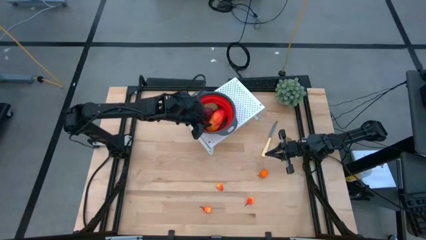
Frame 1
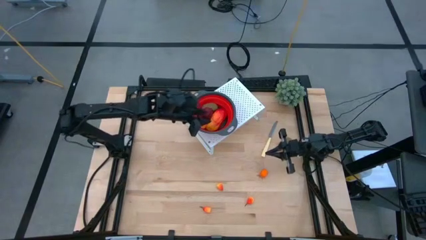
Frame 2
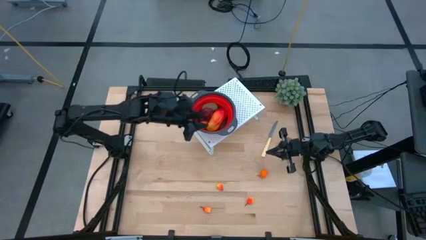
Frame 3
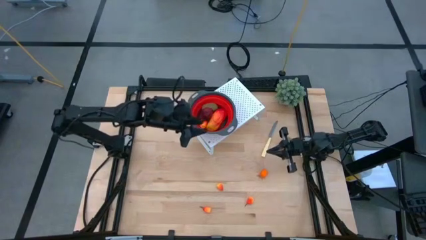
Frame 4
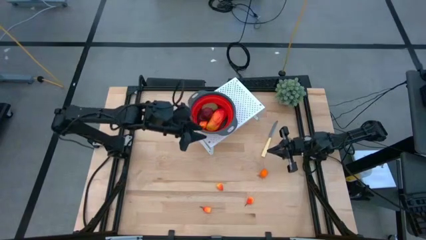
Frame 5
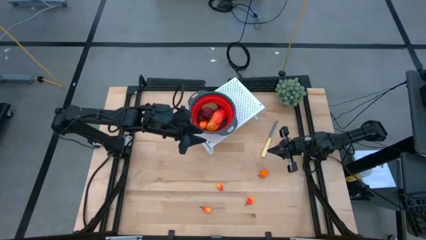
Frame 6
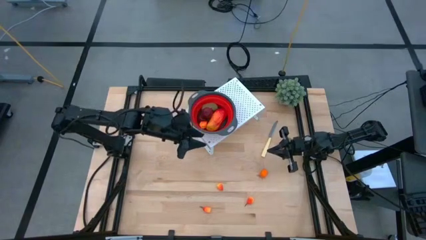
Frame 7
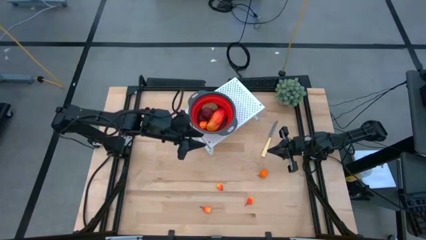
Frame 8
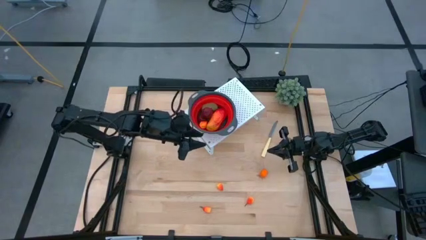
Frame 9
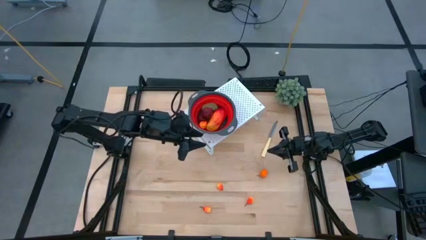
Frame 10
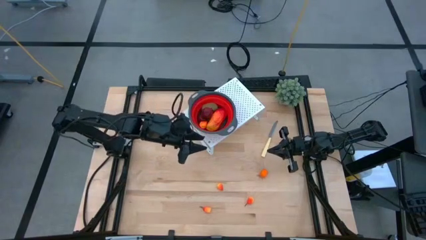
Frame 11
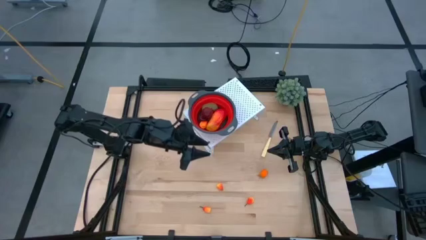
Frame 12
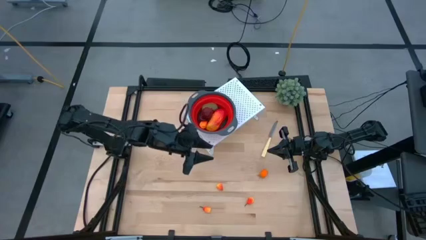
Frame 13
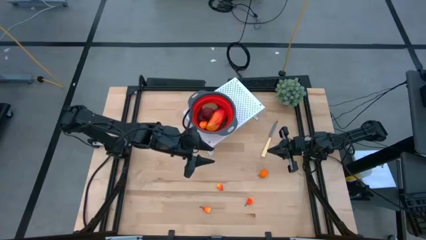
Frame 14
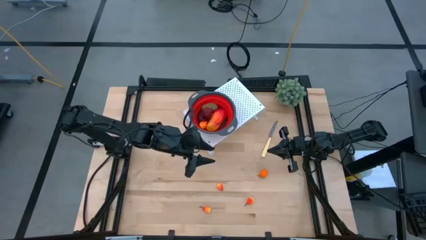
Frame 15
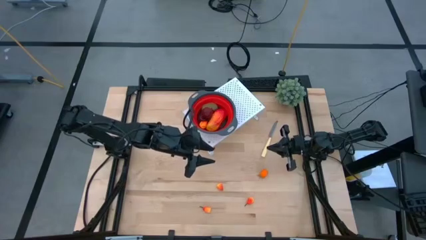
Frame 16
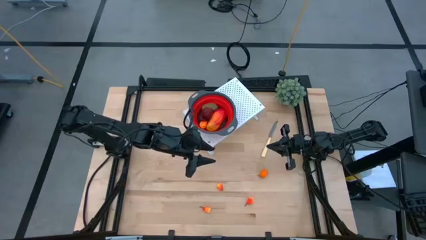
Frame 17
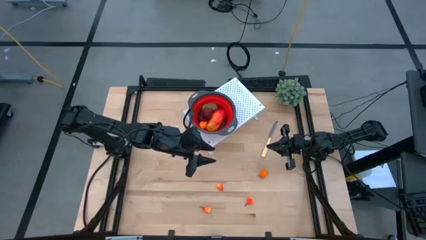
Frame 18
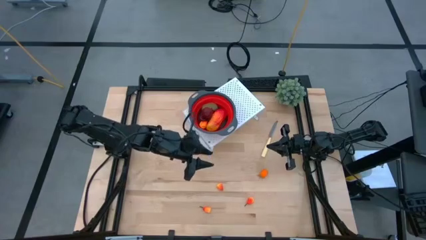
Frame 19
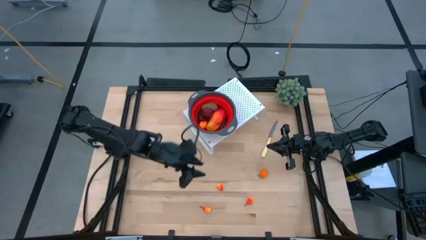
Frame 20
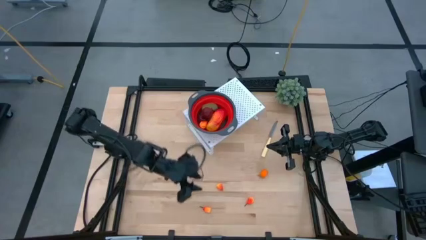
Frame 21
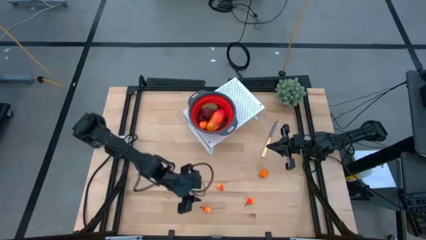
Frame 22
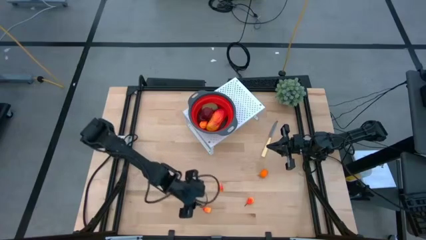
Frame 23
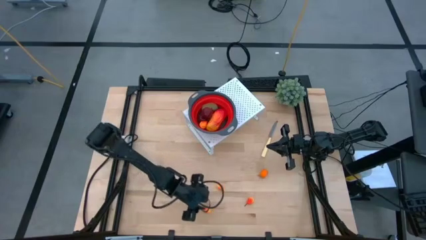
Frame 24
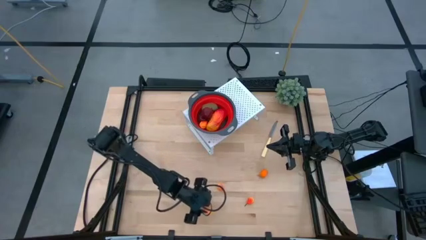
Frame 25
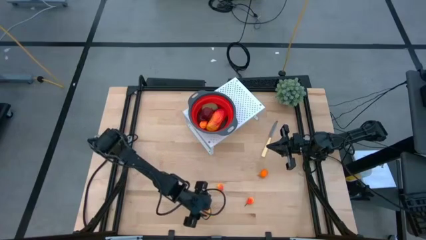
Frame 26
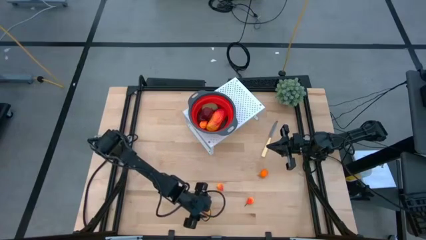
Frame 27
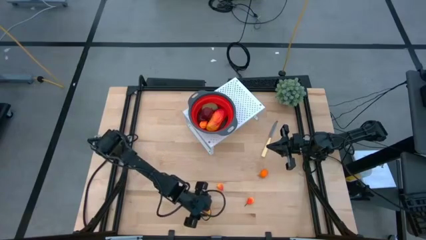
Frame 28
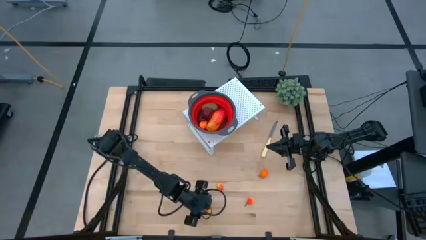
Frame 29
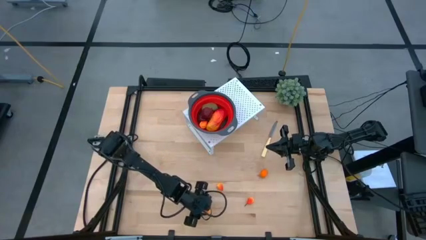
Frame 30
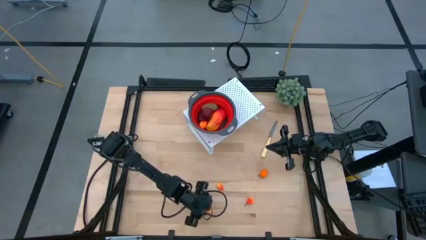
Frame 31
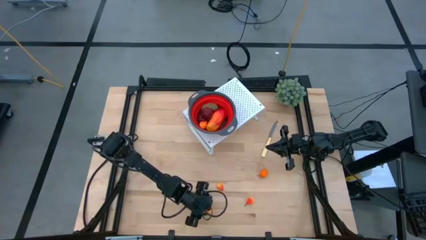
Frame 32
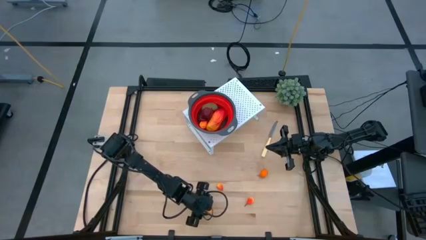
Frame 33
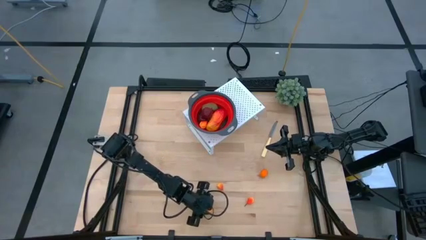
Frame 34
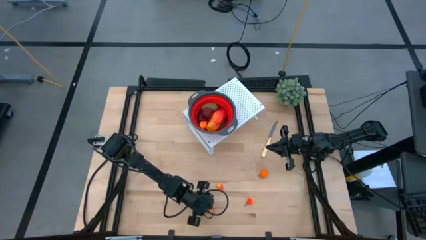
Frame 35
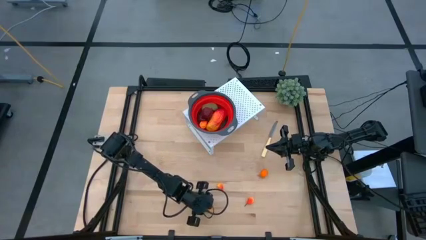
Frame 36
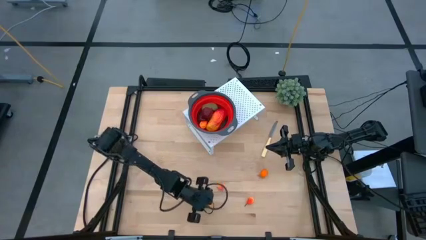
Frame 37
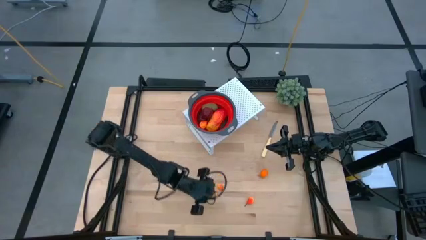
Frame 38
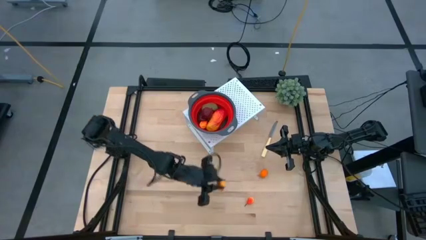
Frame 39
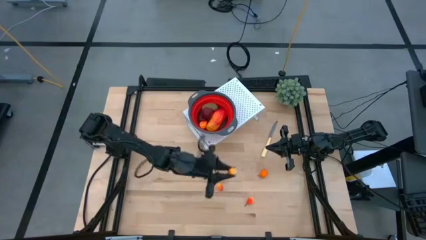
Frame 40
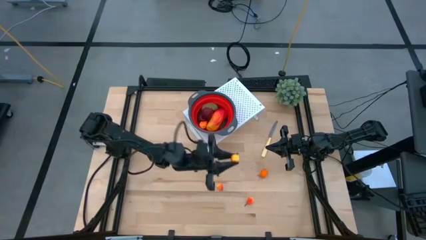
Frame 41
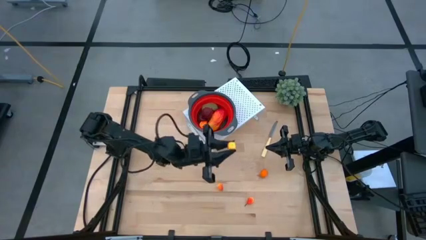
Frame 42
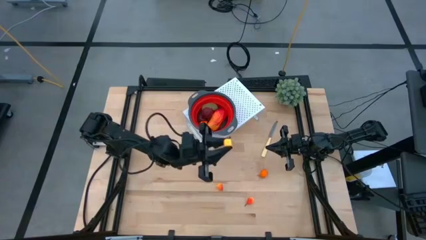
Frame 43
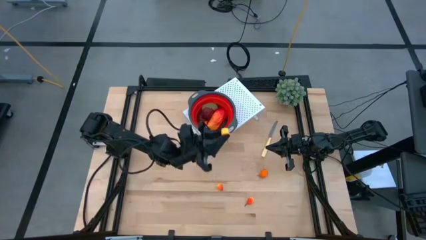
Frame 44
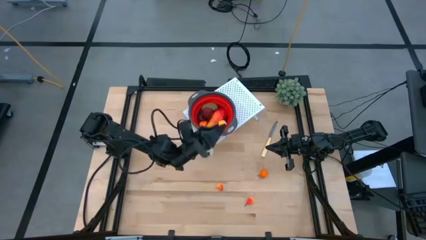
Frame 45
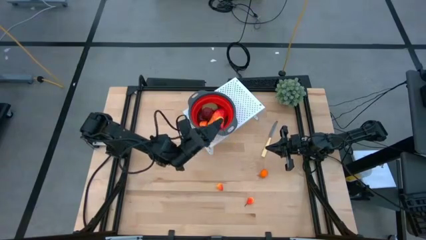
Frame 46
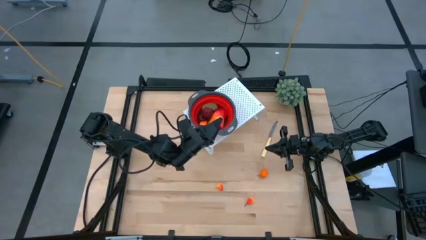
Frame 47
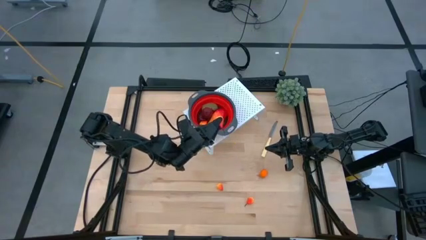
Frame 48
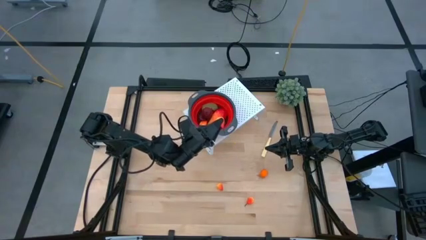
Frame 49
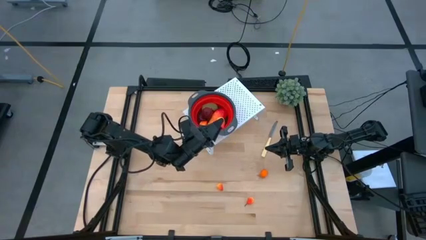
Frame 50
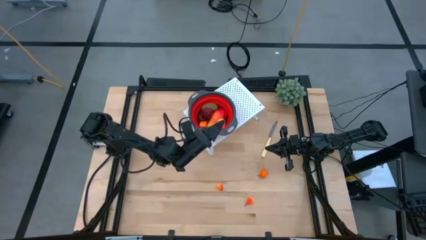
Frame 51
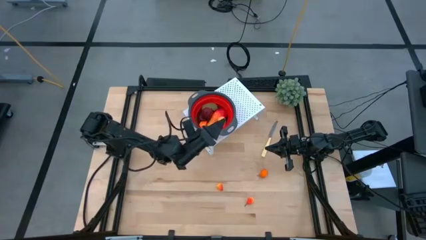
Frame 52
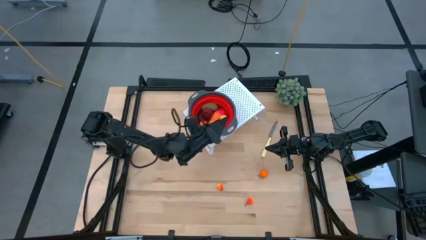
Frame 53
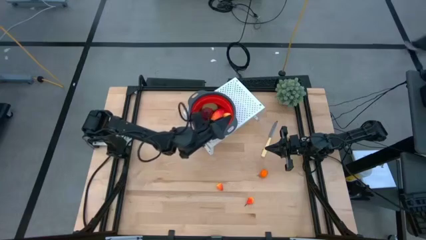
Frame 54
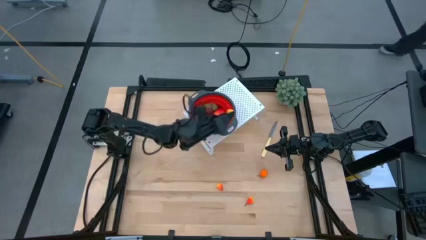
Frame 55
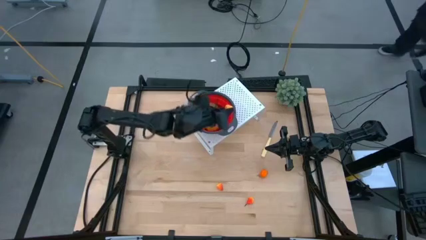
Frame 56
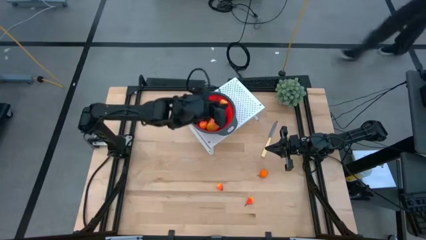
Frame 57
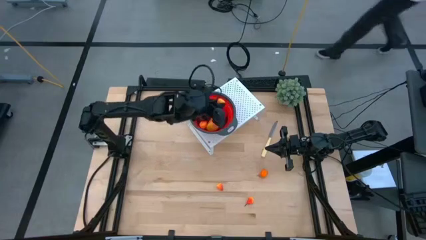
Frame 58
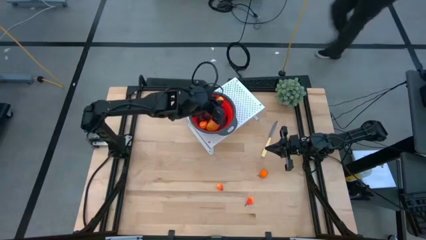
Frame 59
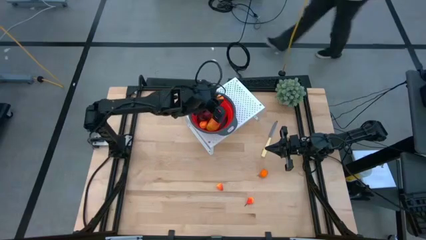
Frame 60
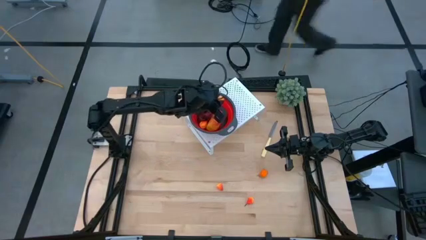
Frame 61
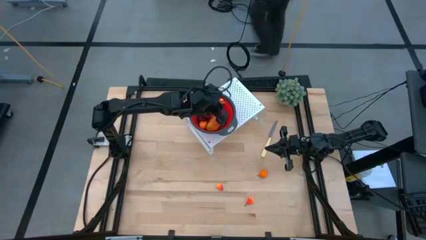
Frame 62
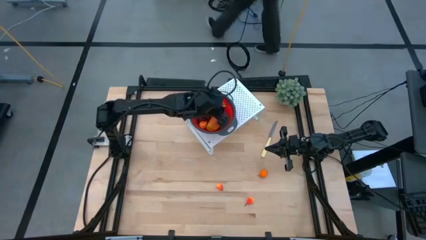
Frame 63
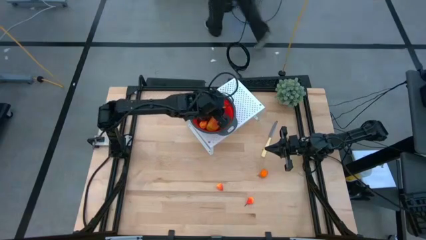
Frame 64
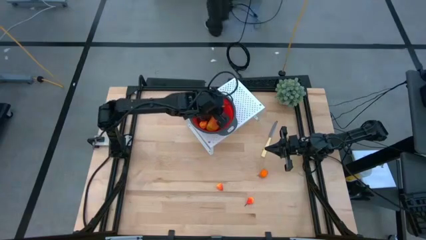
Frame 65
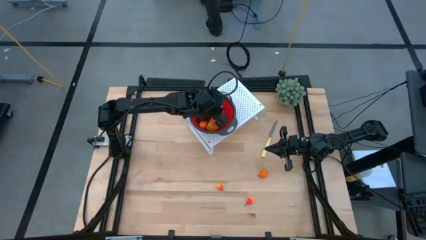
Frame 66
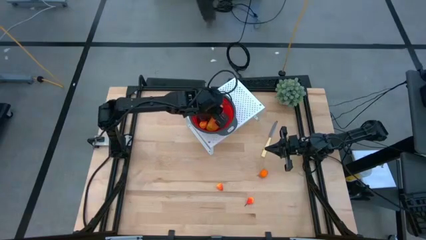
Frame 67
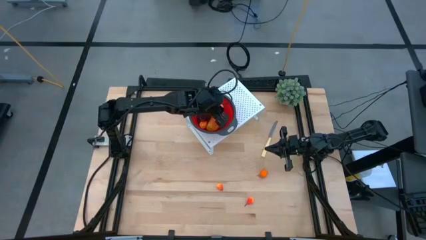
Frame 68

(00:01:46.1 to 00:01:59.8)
Task: Pick & Place Fruit
Put the peach into the red strainer bowl on the shelf

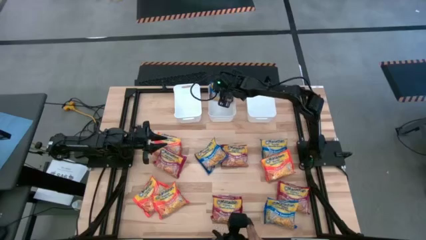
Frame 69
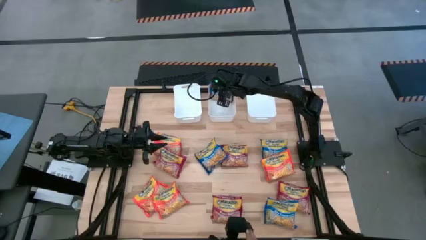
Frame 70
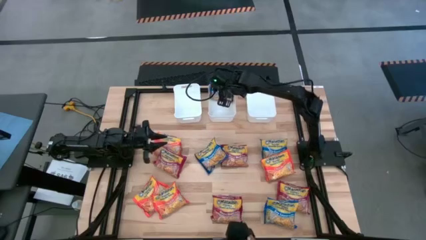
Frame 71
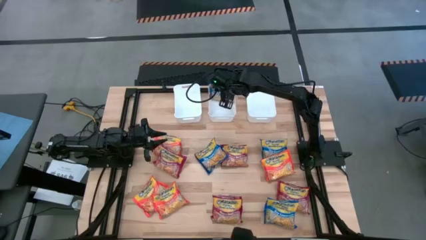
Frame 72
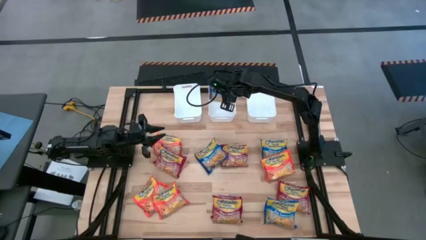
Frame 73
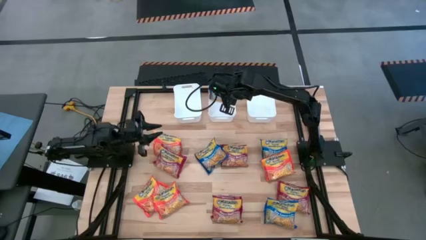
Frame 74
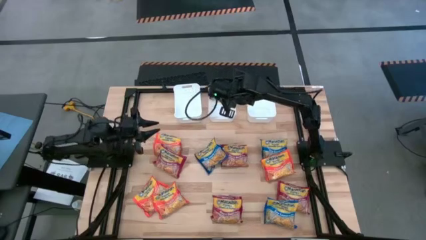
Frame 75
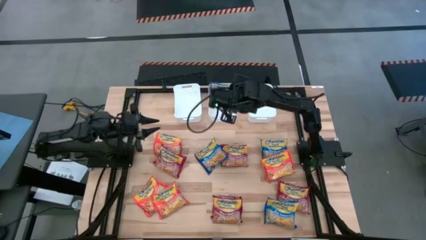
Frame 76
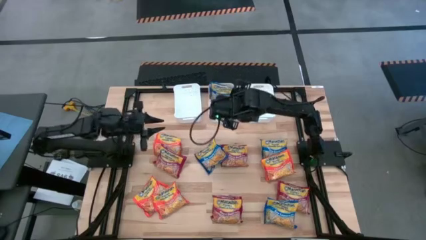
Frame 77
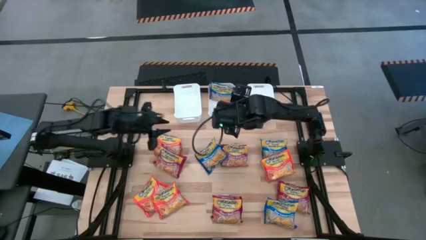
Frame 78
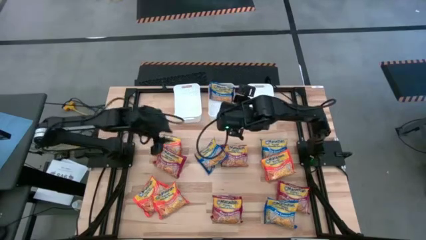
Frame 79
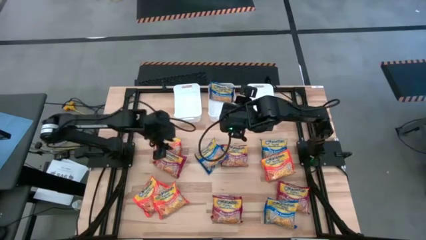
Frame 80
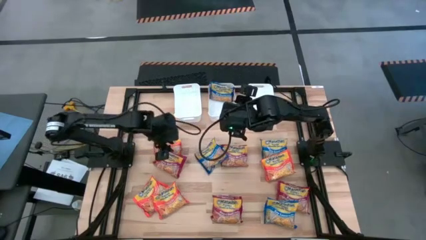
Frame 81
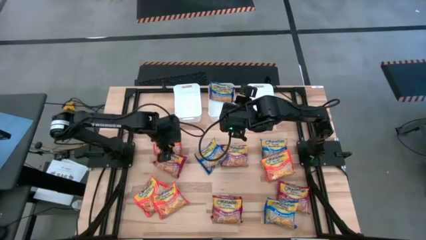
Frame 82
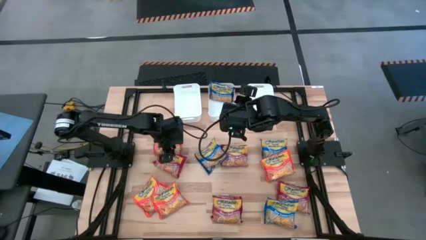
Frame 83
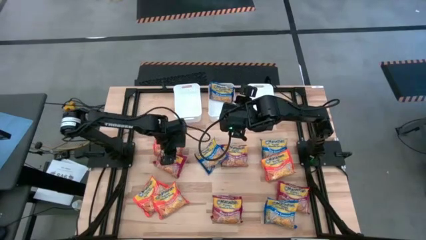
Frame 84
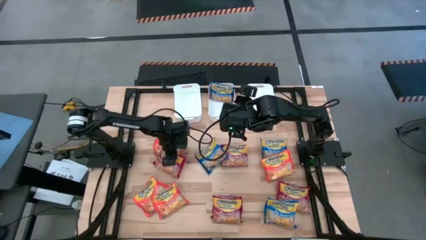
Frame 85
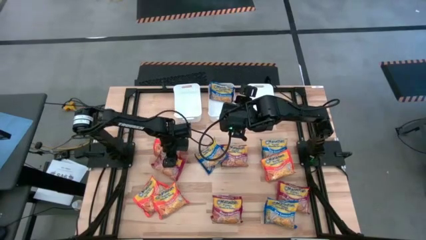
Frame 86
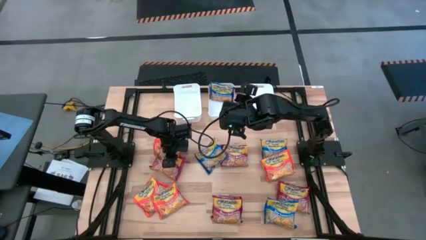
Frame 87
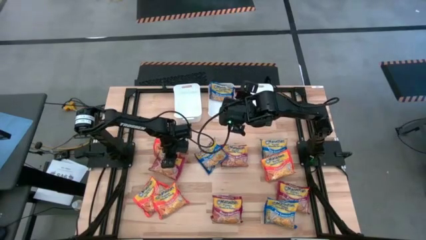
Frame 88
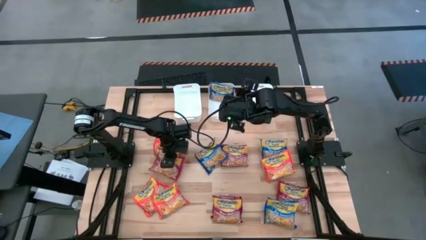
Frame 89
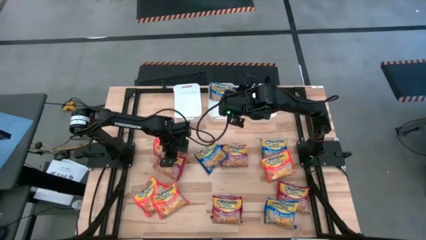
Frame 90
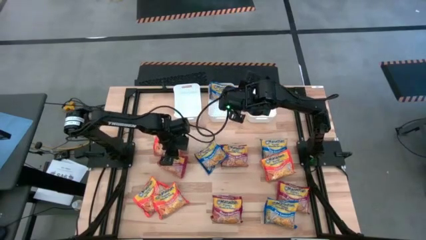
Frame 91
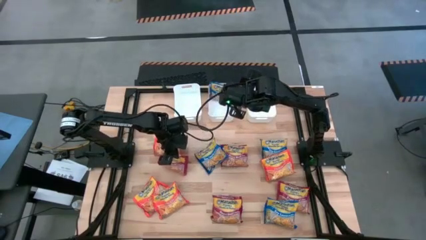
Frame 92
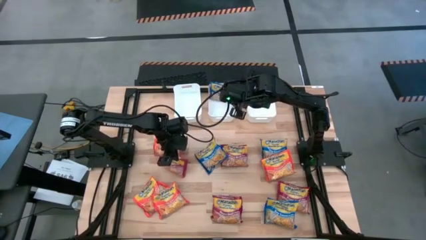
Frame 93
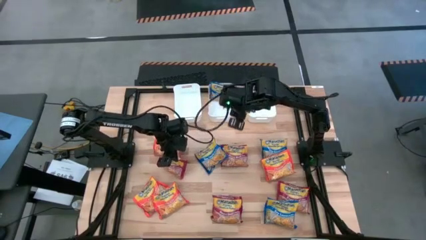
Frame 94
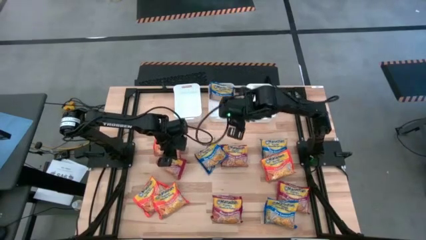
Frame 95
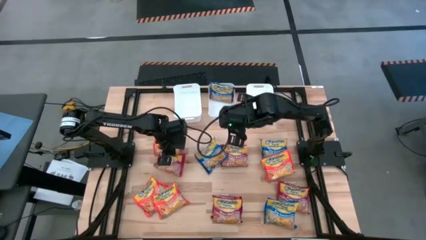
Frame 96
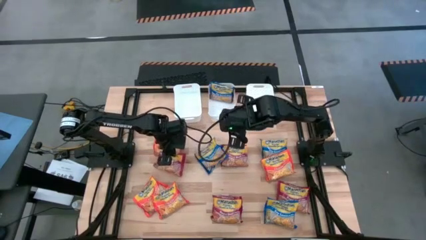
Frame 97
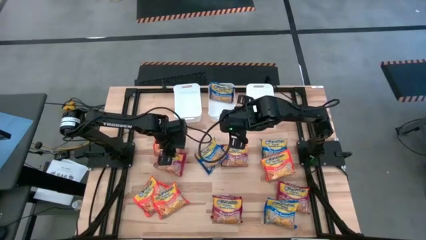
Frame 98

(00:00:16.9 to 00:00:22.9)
Task: Sort Maruchan noodles
Put the red noodle pack into the right white bin
